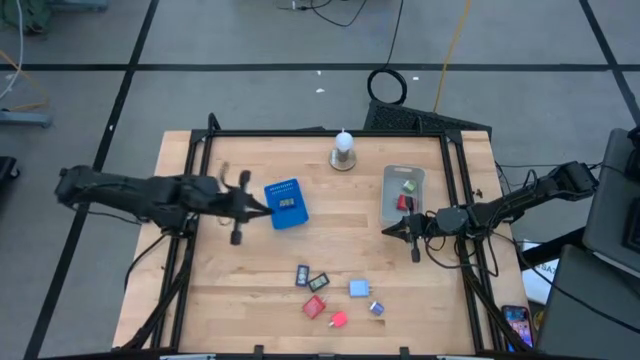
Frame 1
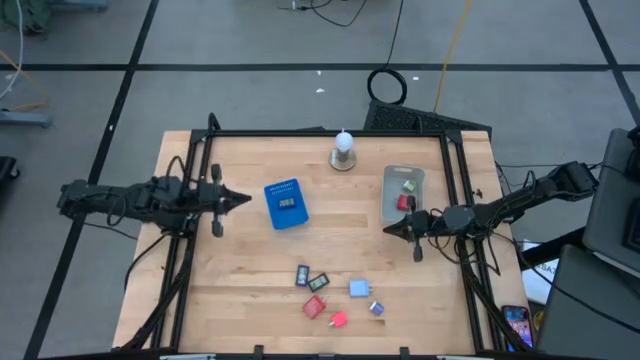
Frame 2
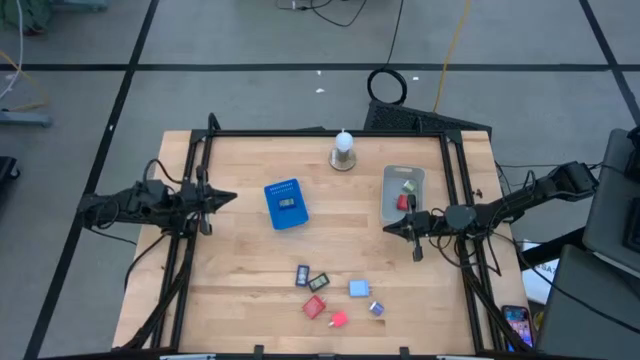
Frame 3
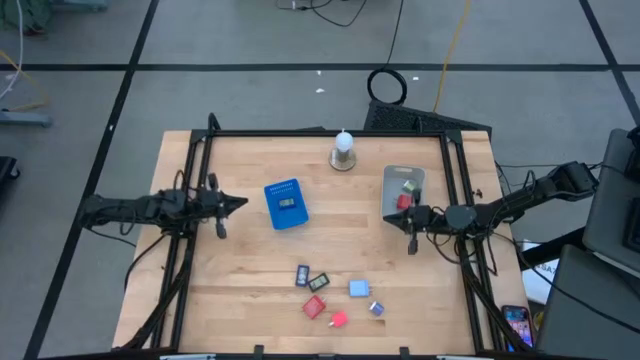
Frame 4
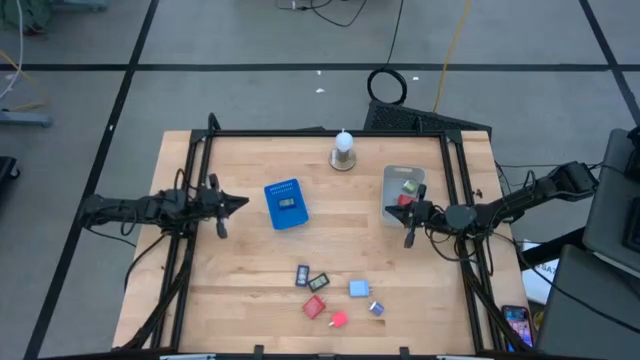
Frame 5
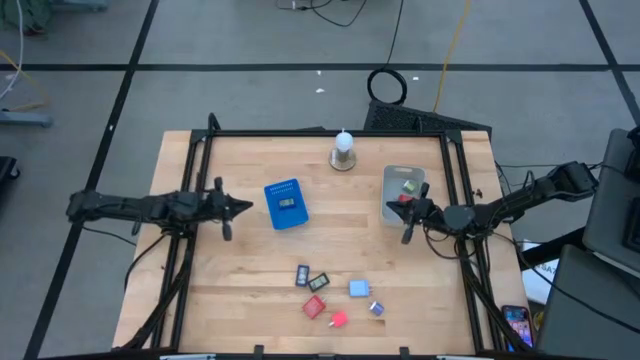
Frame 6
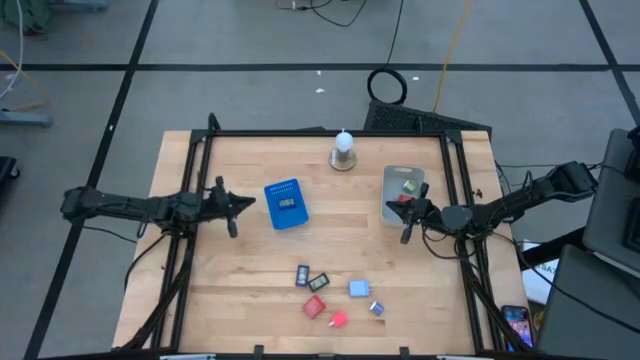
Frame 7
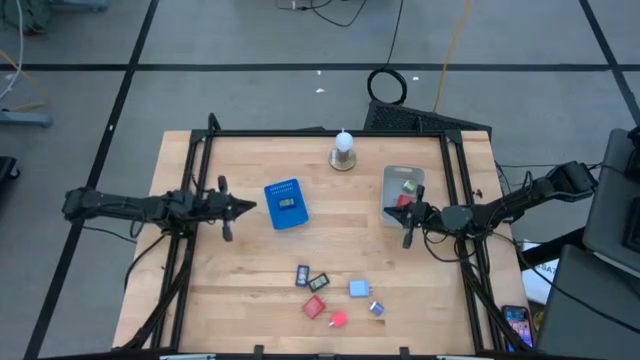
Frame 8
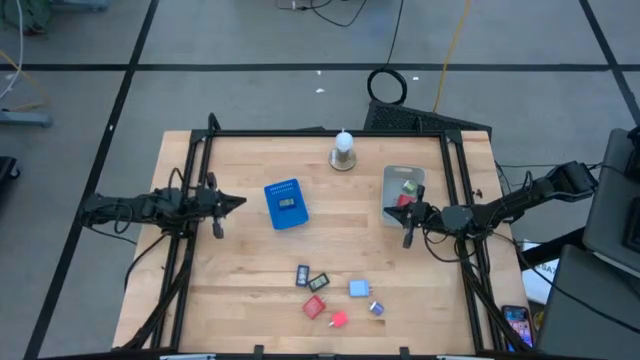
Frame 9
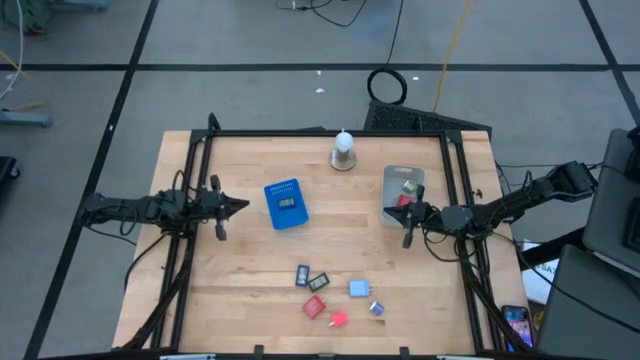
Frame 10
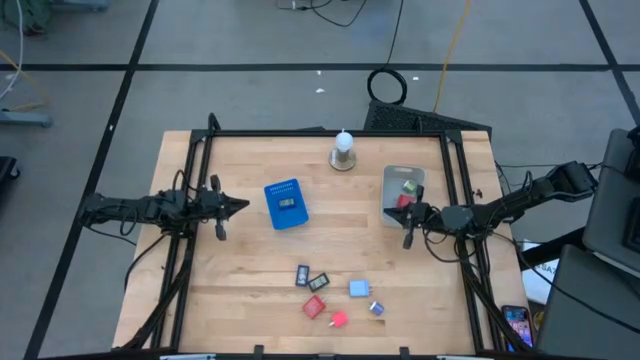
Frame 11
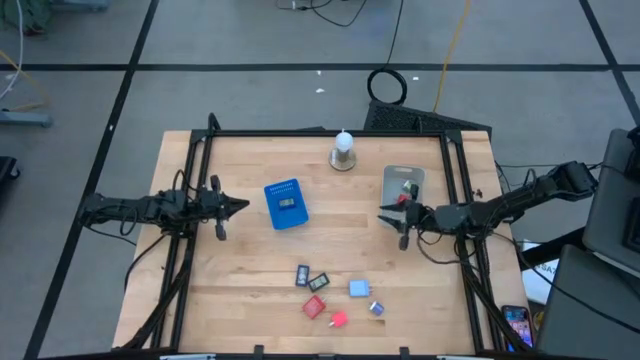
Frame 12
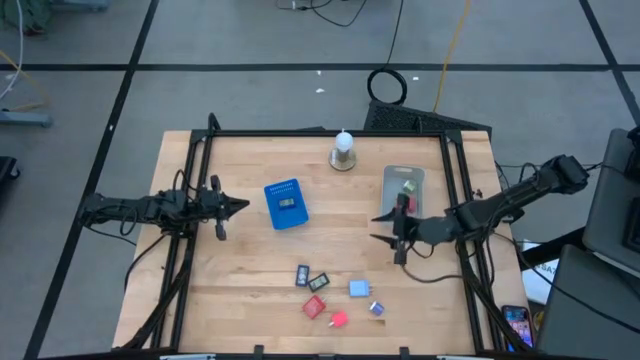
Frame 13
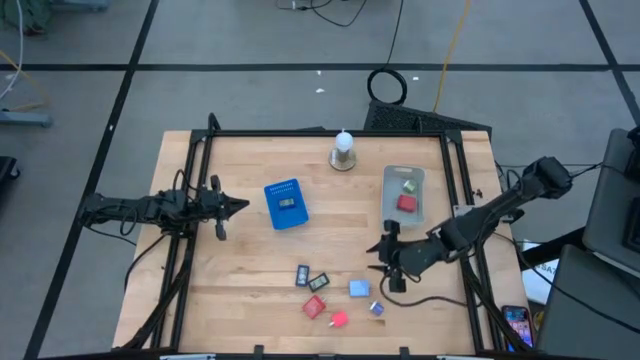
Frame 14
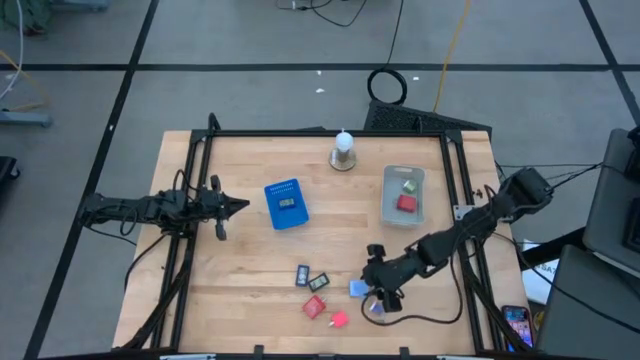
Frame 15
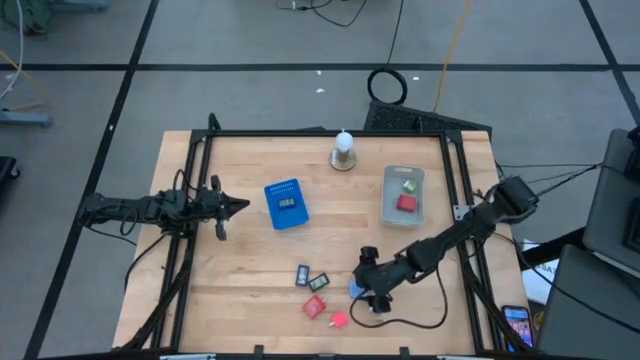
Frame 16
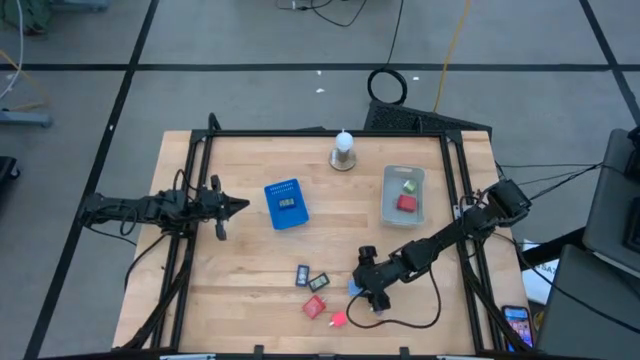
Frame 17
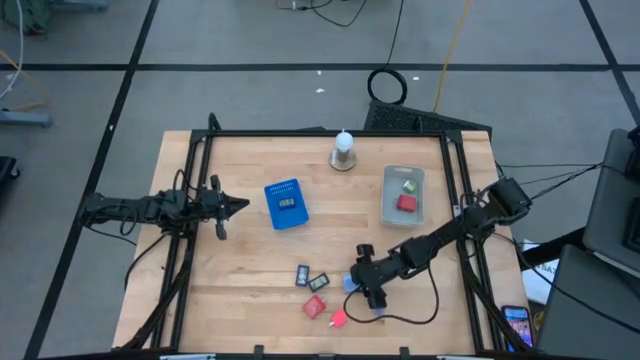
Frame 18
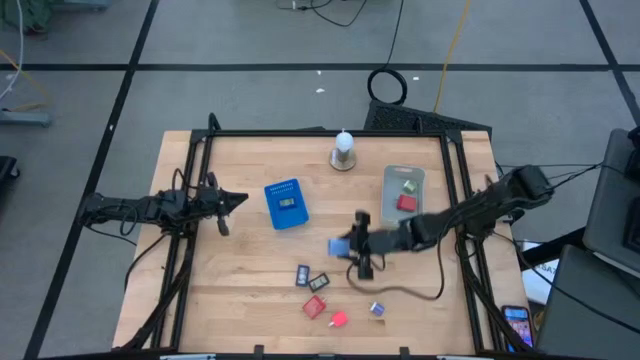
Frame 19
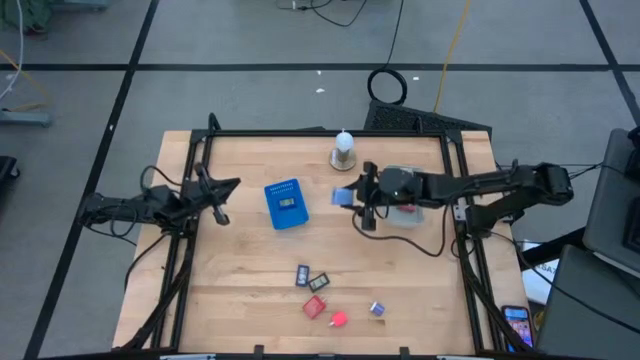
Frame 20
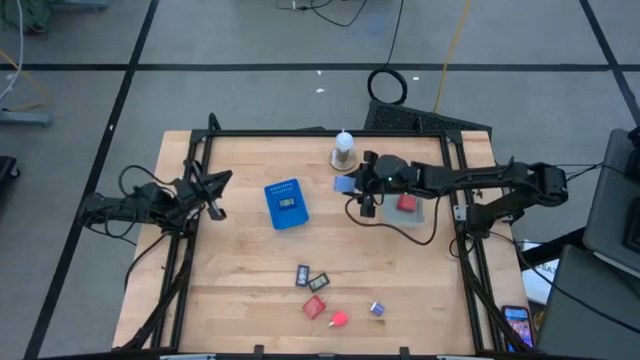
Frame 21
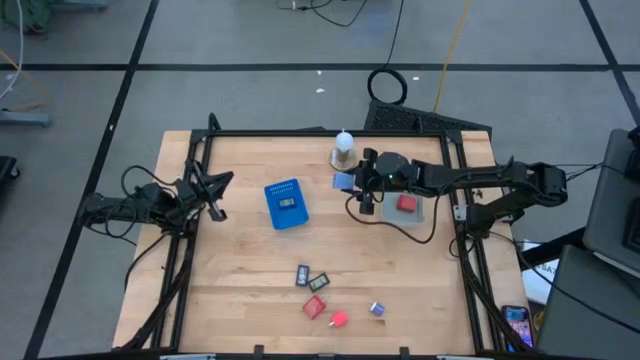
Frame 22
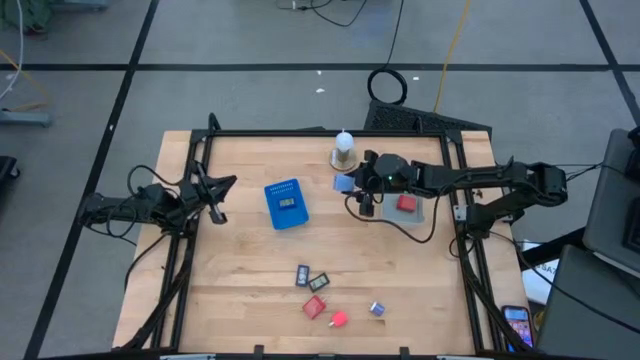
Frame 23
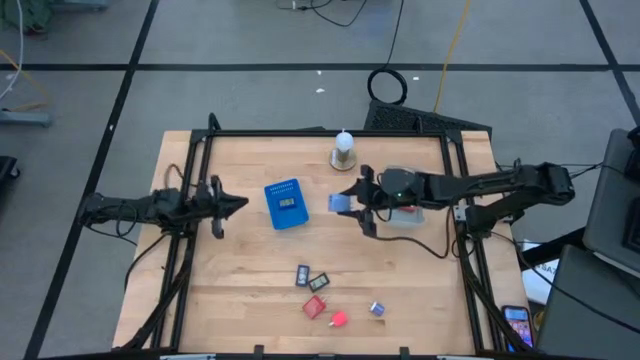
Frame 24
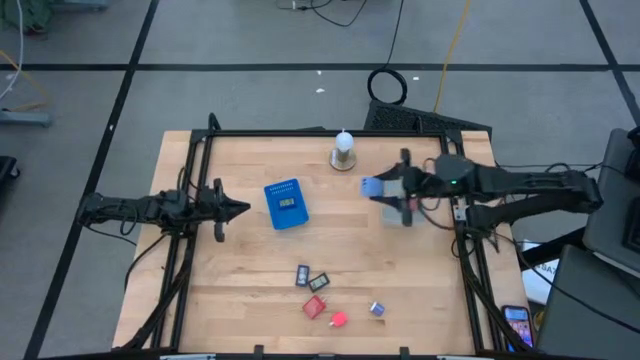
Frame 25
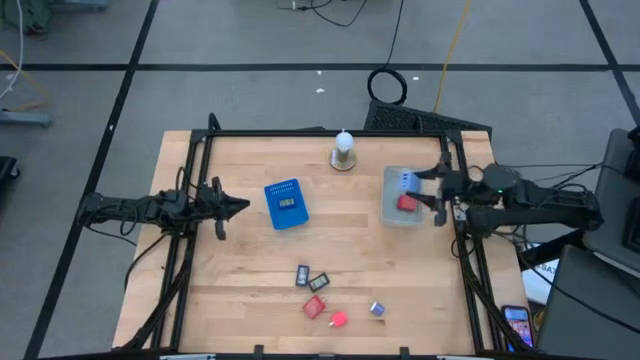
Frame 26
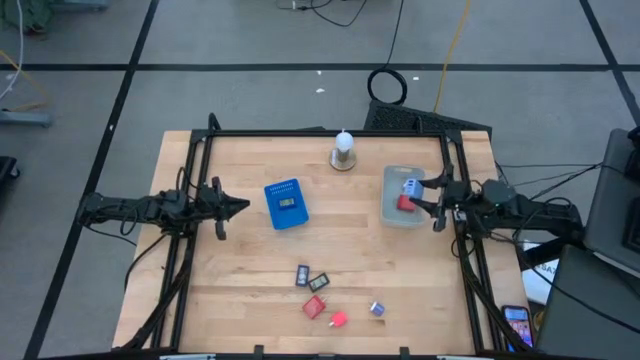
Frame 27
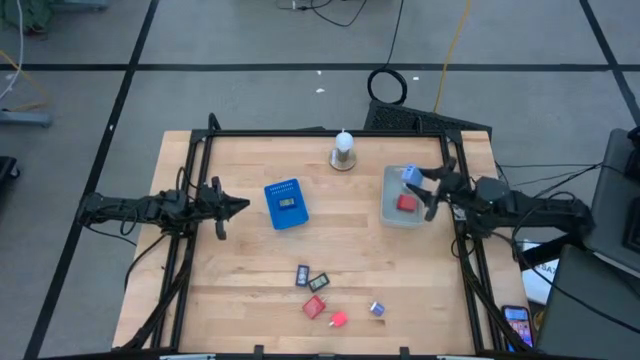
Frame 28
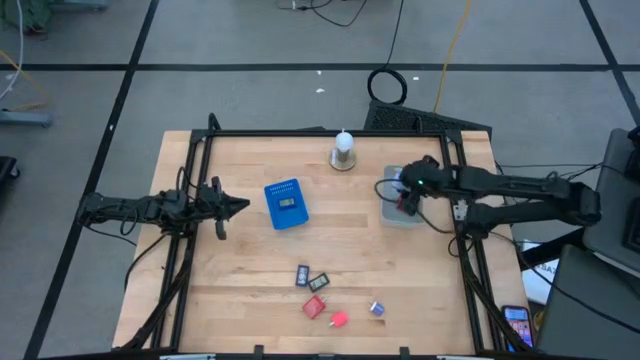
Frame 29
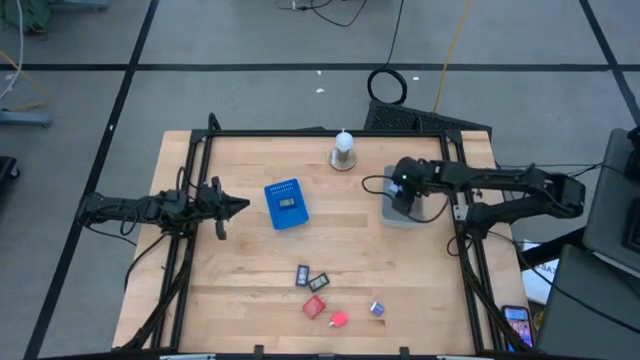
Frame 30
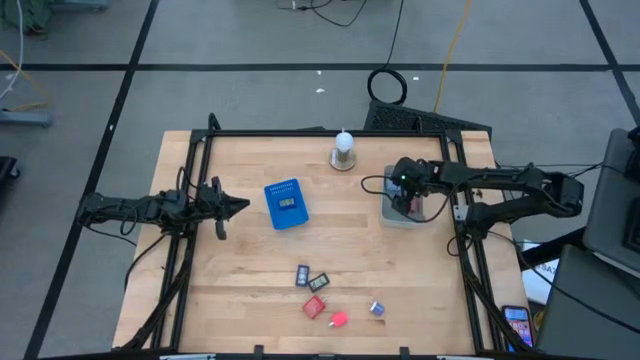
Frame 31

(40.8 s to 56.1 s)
Task: Pick & Place Office items
Put the light blue charger adapter into the gray bin

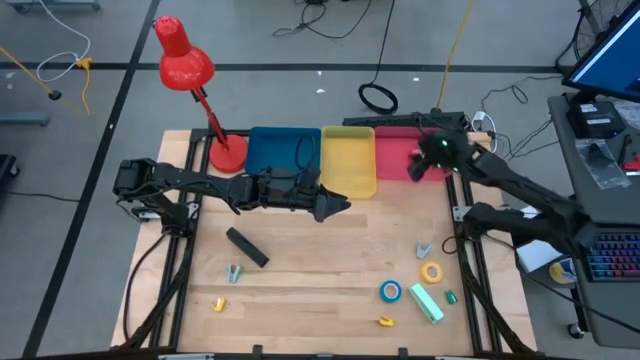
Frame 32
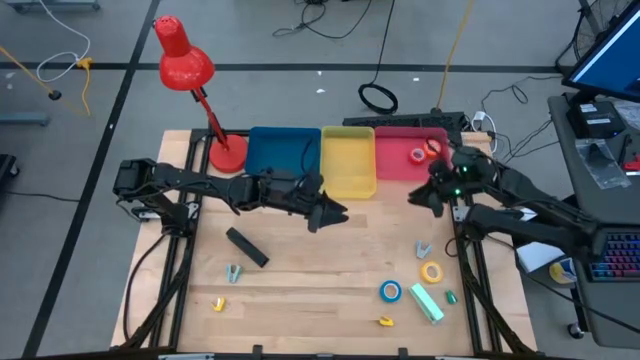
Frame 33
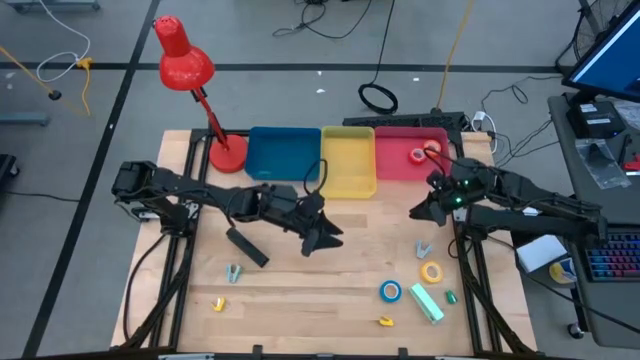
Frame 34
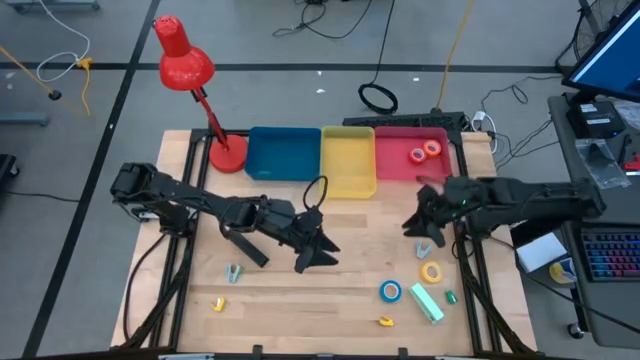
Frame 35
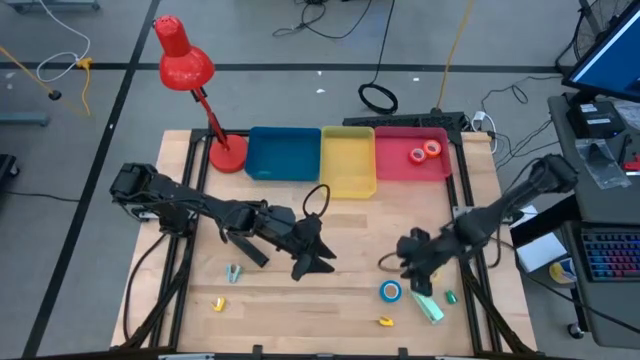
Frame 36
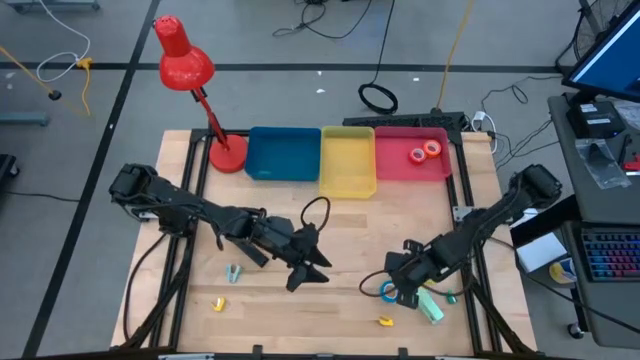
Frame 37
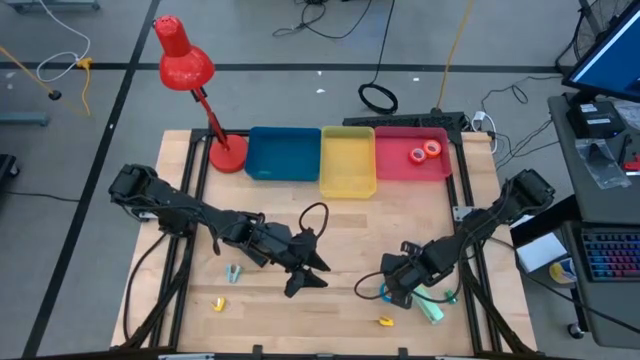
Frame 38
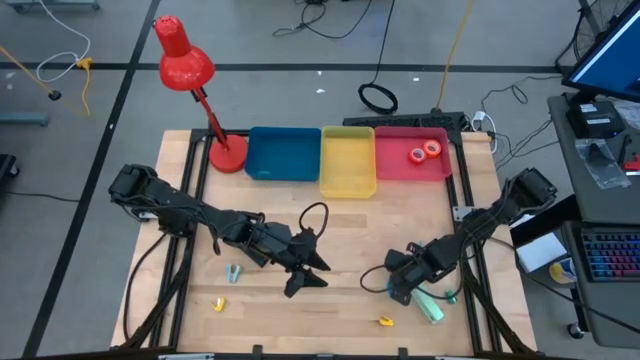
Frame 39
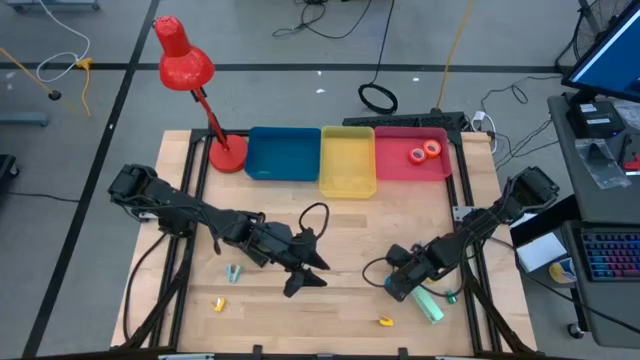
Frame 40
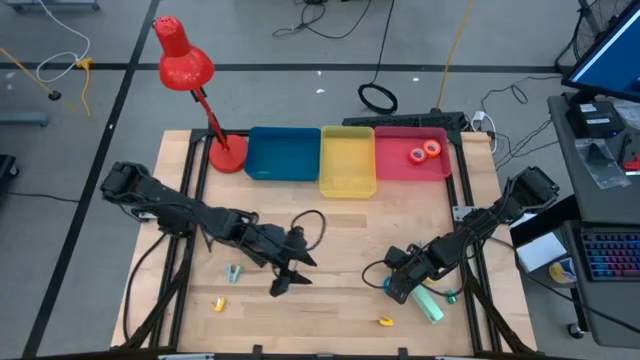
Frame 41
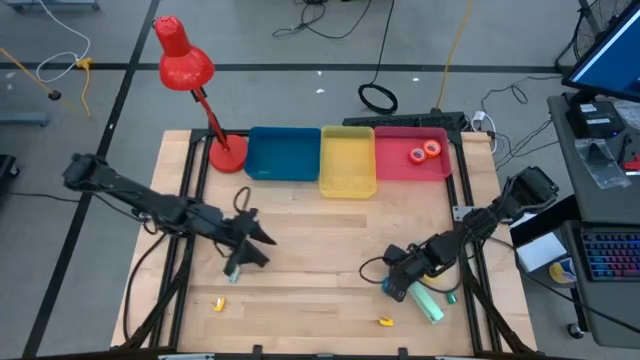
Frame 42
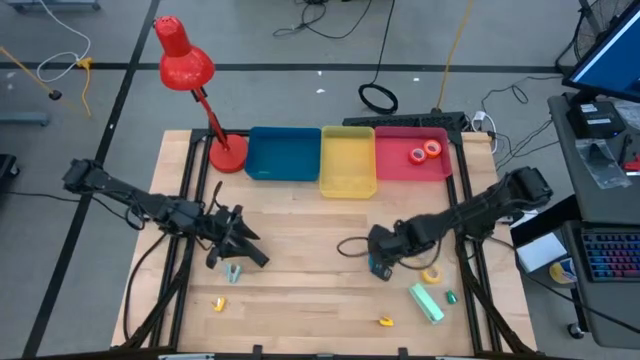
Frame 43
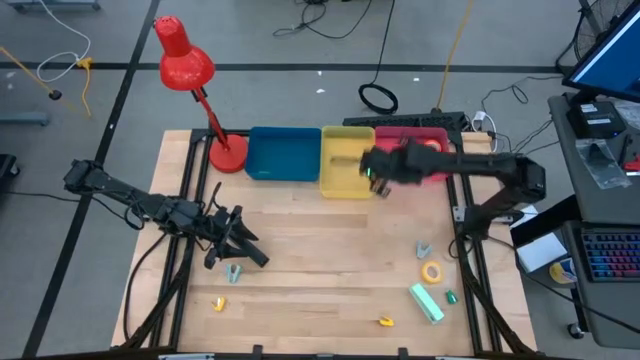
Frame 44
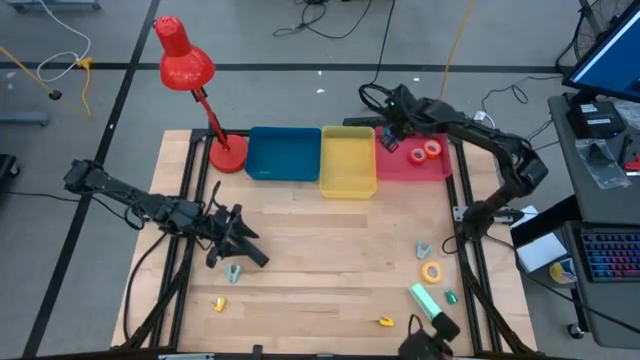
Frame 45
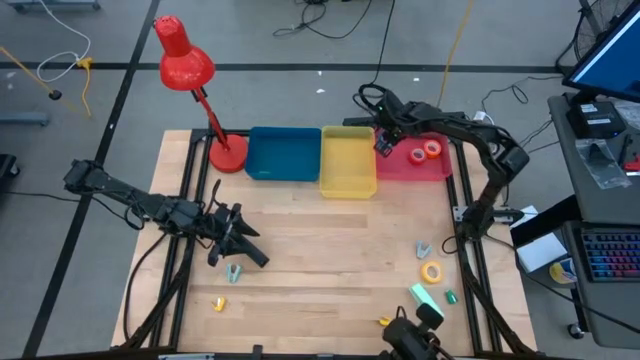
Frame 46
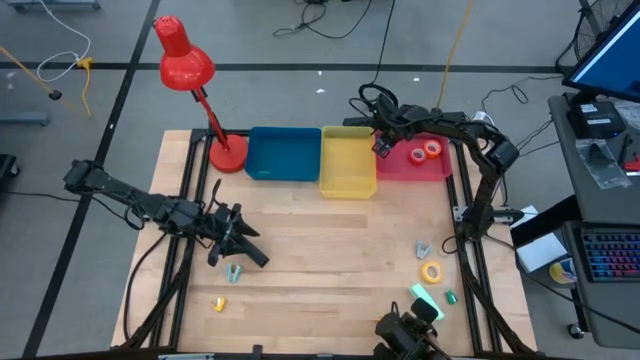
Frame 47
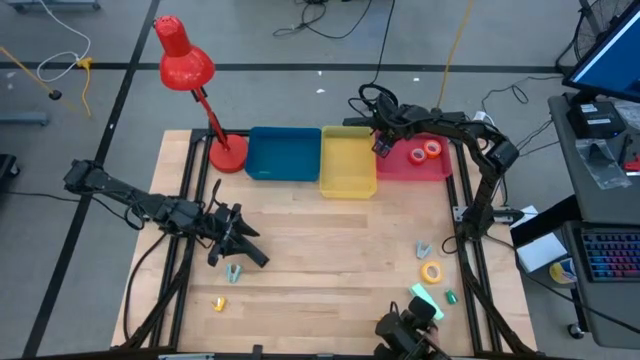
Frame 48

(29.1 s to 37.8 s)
Task: Pick and place Stapler, Stapler remover, tape
Put the blue tape into the red bin
